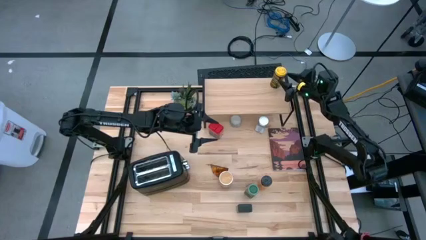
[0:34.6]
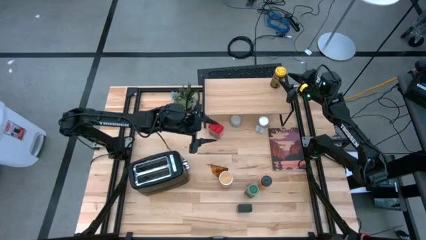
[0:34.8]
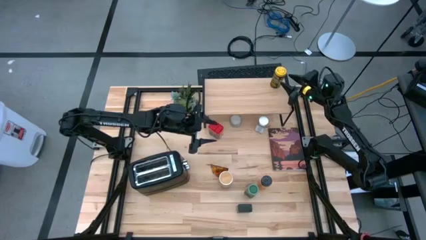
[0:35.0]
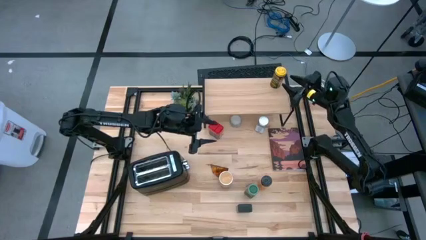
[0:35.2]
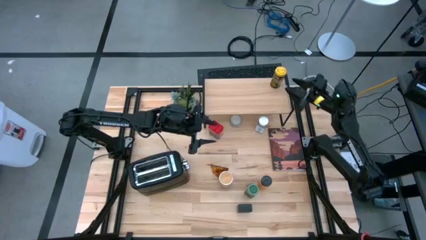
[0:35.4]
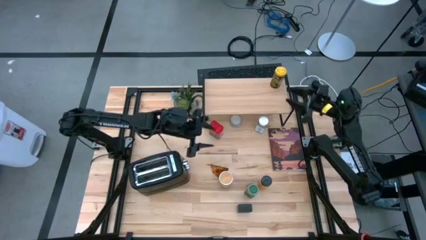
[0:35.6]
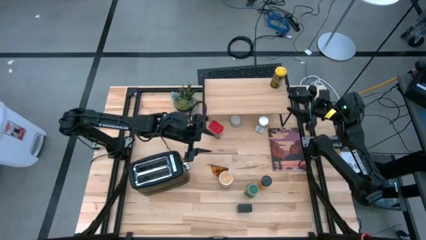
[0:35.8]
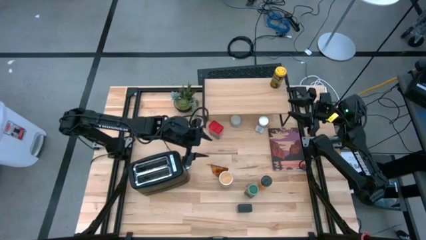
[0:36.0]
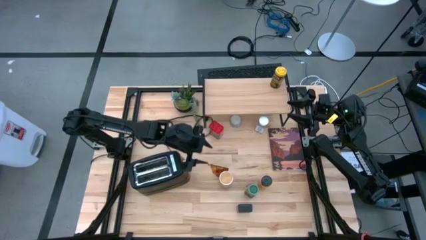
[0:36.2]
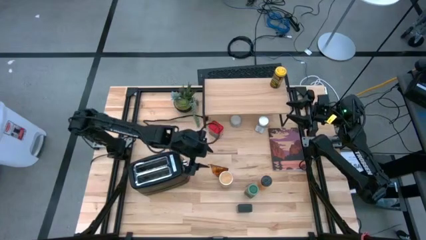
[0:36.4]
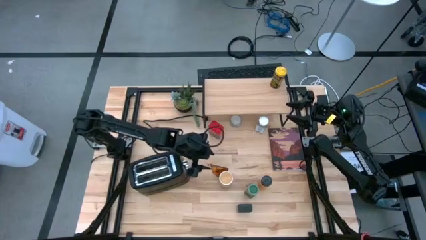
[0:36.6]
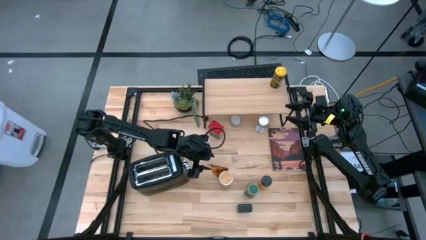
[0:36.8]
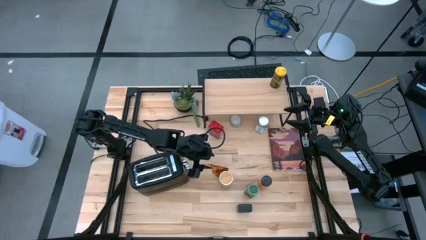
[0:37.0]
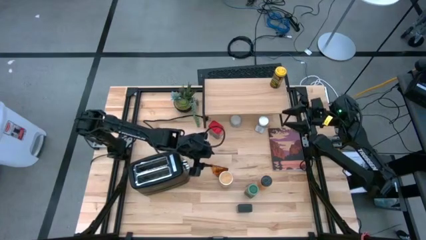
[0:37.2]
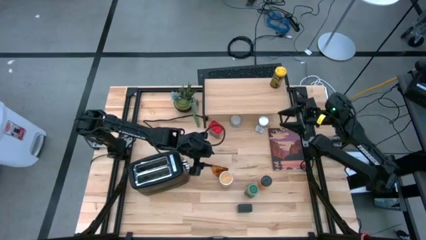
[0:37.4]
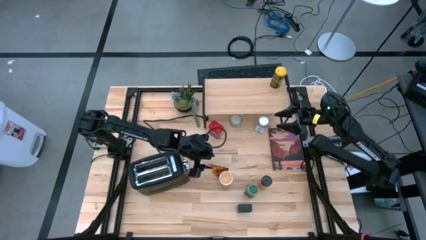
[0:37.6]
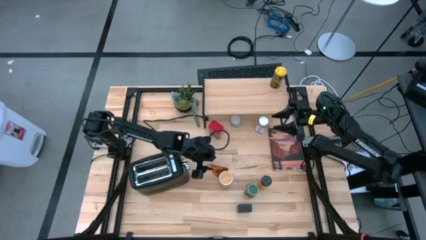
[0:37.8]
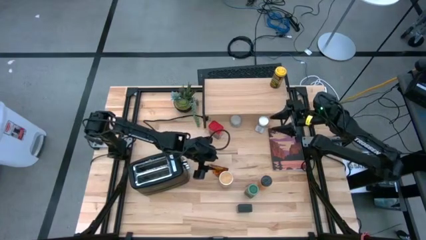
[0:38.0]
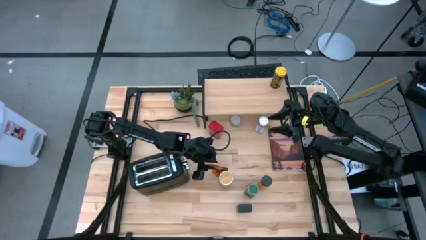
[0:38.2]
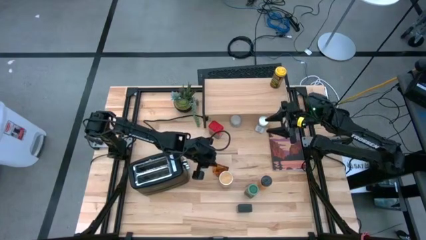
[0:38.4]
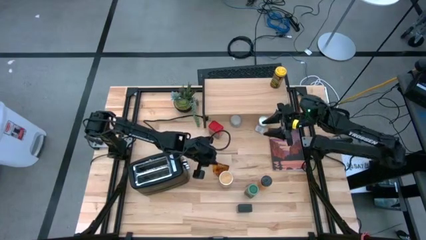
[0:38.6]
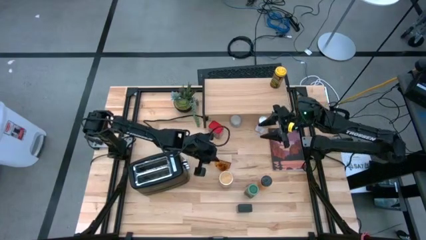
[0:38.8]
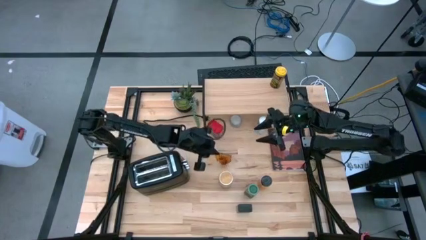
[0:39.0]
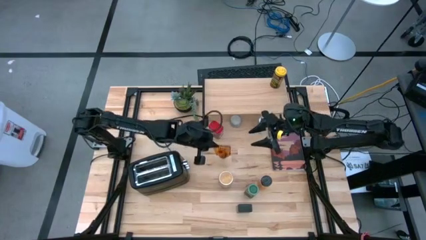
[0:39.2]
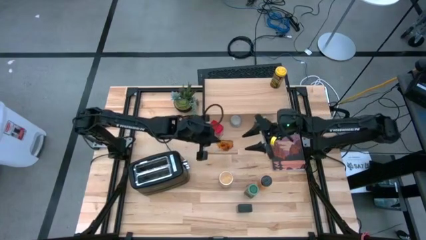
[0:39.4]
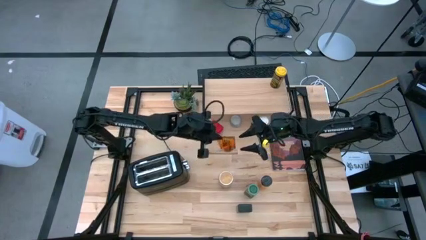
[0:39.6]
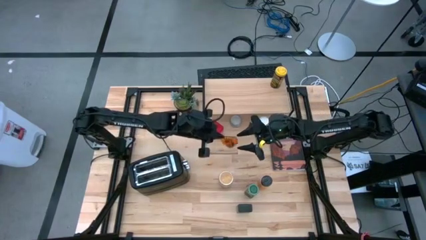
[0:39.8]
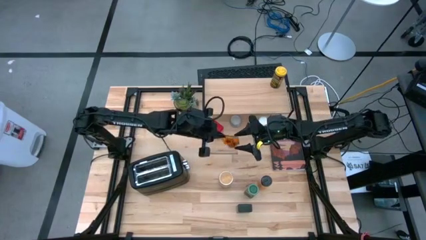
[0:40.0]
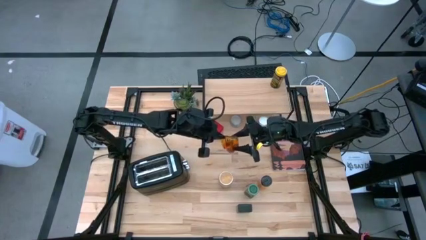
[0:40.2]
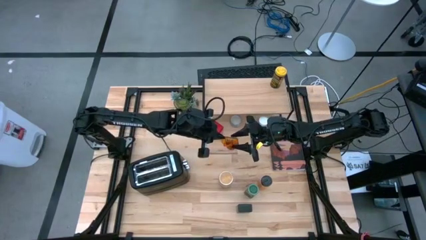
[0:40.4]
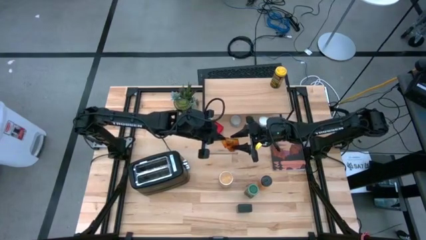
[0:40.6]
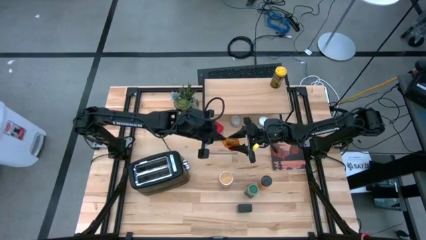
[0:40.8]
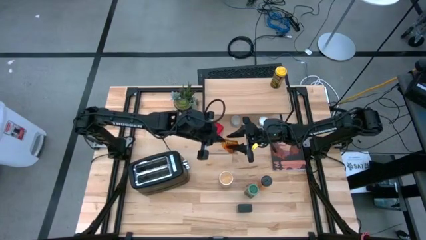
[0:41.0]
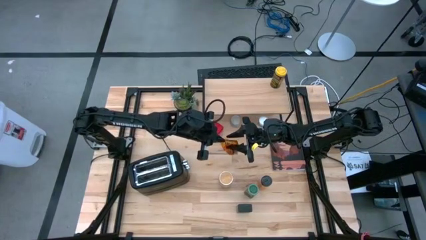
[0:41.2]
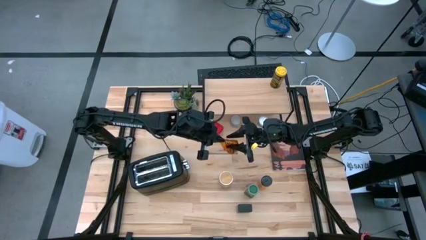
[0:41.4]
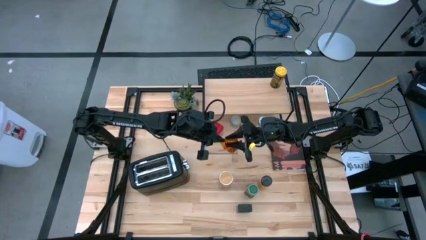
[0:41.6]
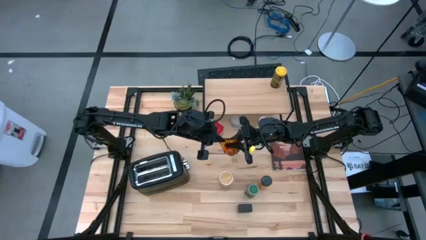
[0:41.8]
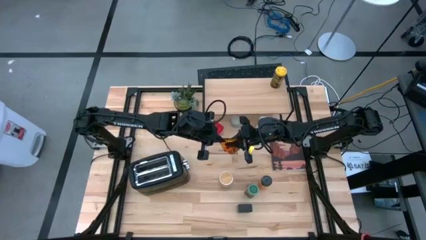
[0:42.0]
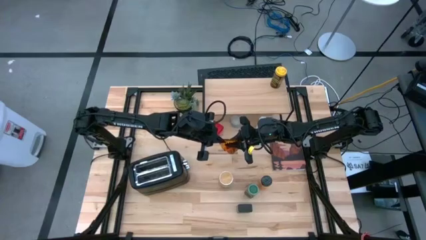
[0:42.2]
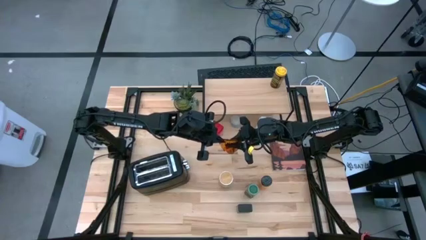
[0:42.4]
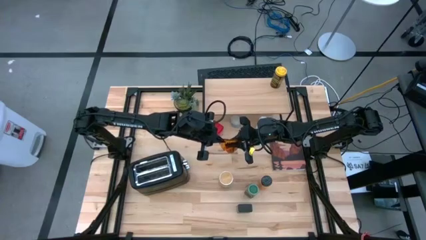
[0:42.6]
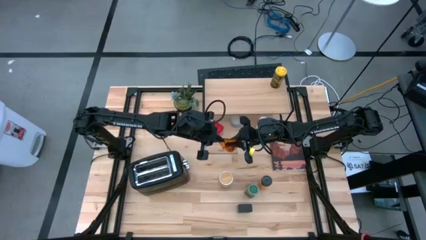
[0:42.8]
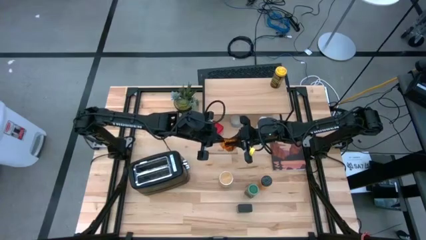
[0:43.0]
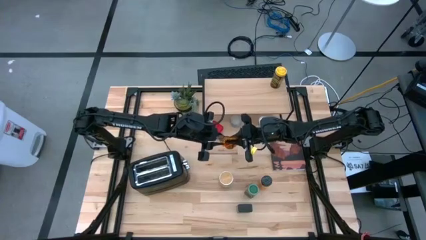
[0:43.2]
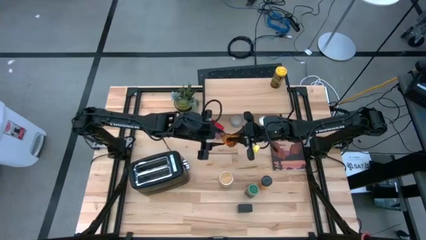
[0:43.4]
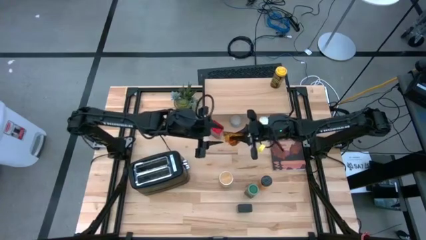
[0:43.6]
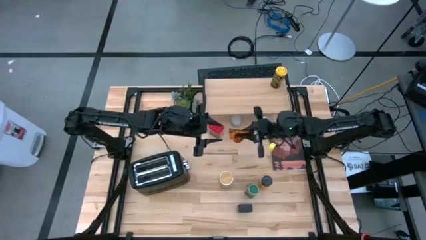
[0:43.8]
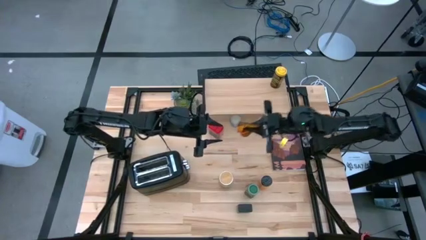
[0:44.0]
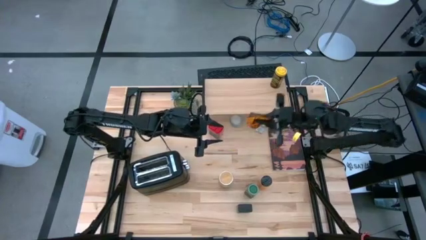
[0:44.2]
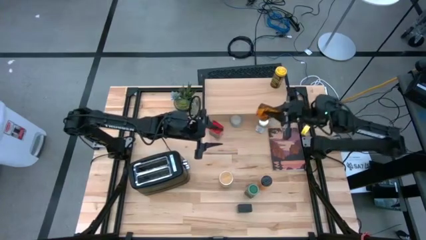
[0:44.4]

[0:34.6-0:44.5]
Task: Shelf spices
Put the orange seasoning bag on the shelf

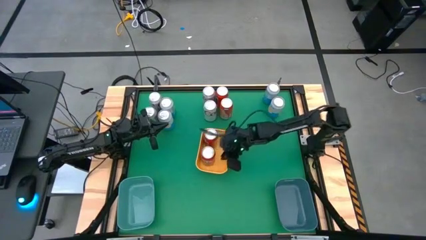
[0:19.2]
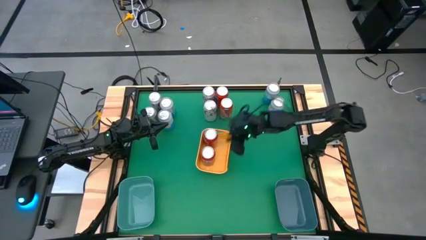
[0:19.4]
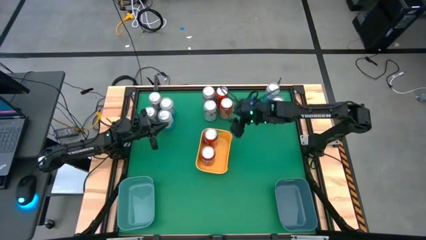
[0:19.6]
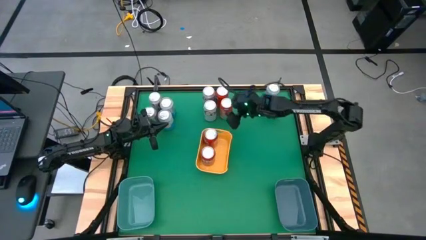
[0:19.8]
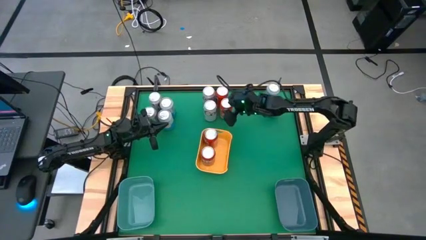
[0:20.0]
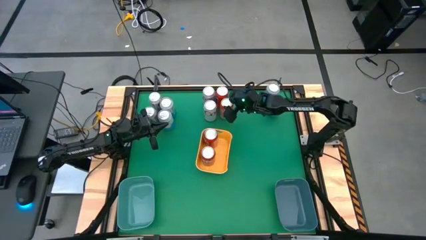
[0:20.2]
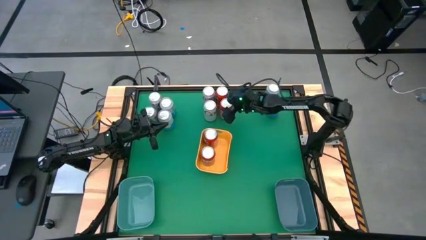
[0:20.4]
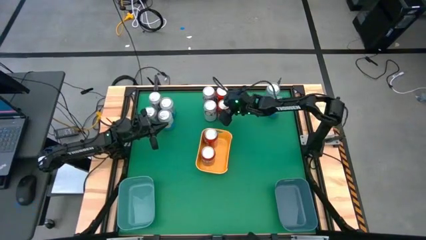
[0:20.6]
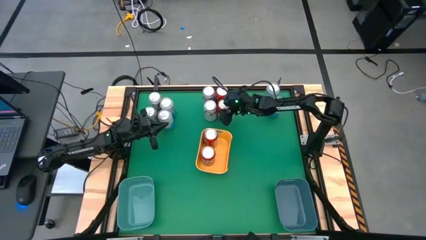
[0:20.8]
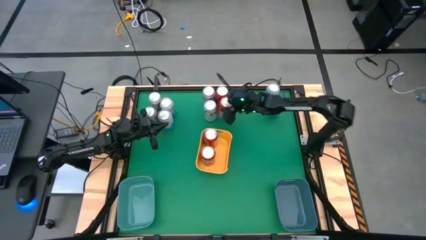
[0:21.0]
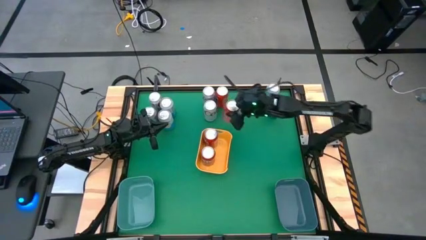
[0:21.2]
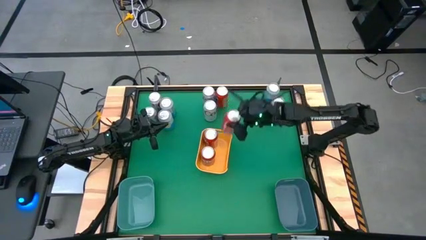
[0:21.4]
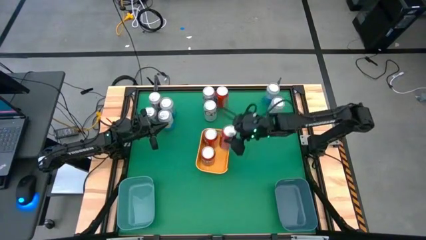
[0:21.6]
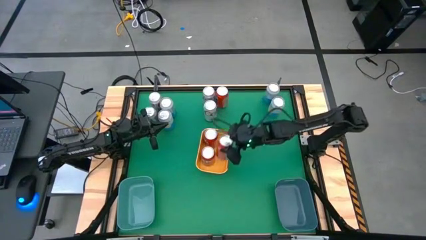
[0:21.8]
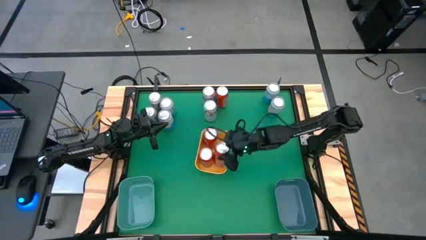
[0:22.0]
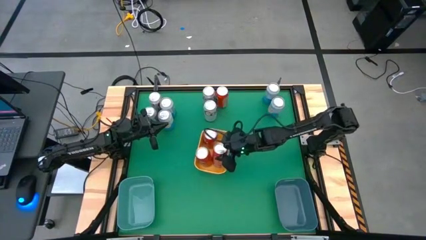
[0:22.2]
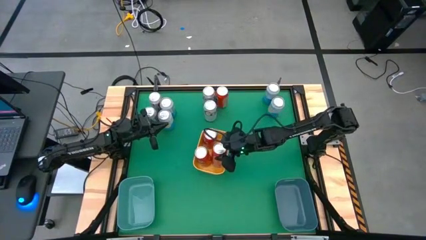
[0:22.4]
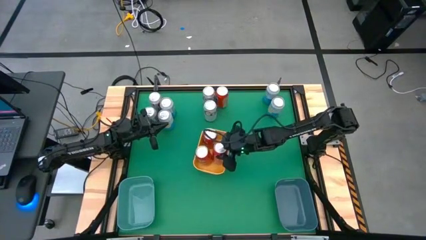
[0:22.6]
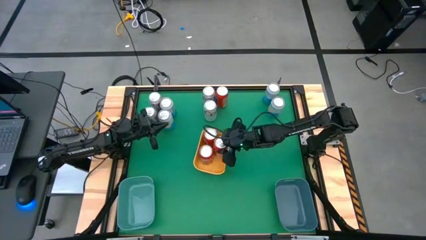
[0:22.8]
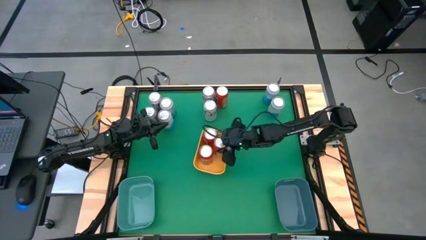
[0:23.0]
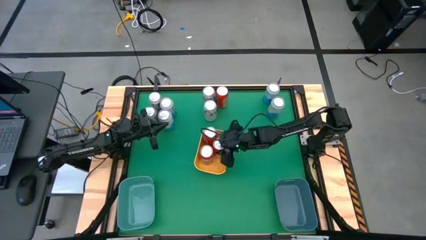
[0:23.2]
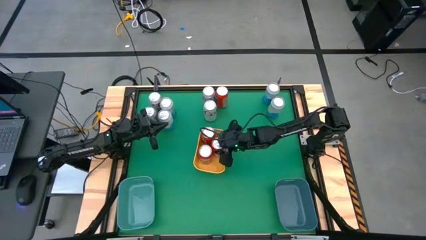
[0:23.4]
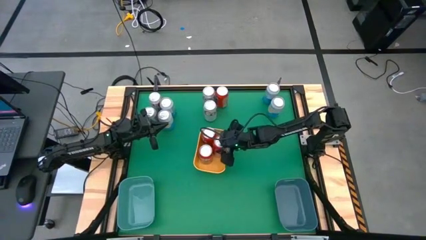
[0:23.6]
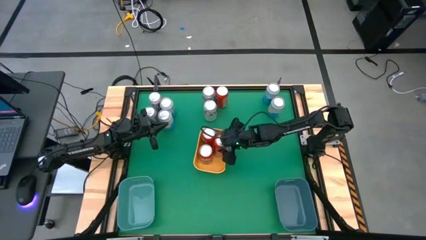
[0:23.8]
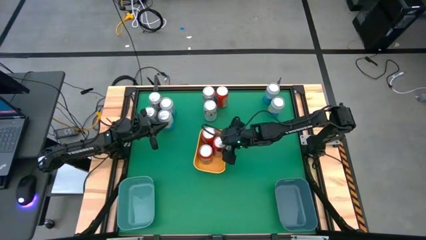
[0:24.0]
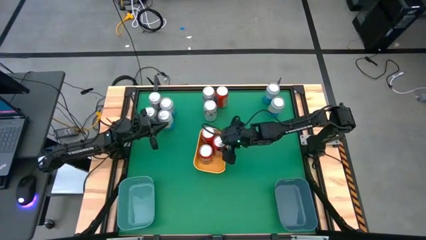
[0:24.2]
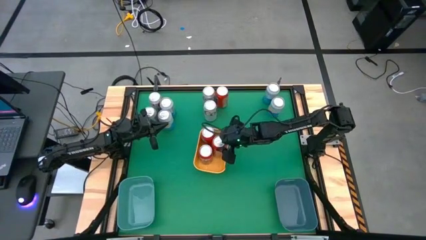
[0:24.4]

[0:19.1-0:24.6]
Task: Sort soda cans
Put the bottom orange soda can into the yellow bin
